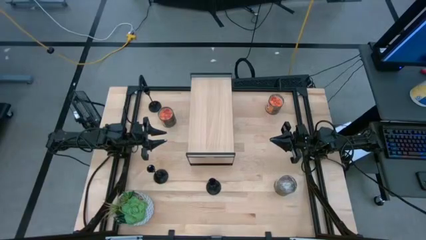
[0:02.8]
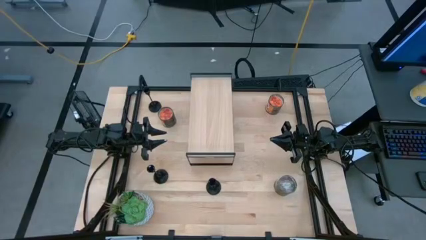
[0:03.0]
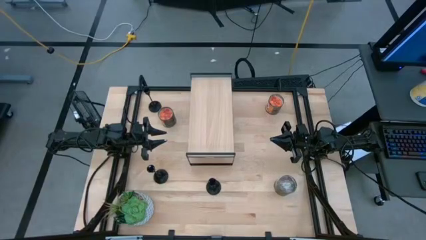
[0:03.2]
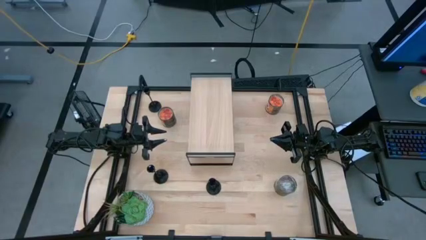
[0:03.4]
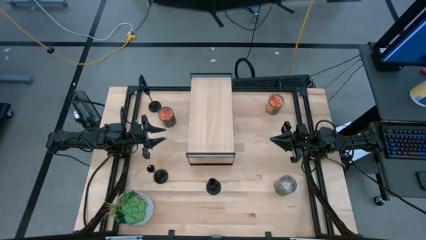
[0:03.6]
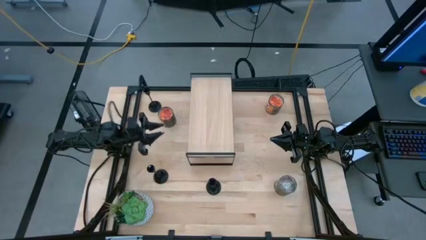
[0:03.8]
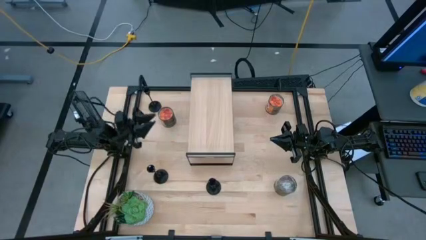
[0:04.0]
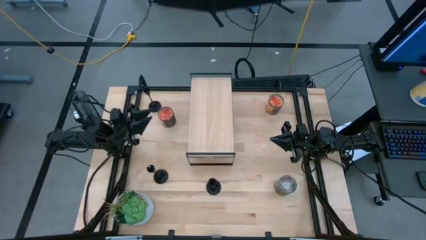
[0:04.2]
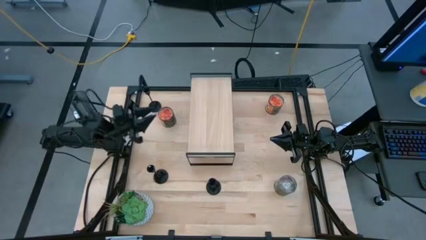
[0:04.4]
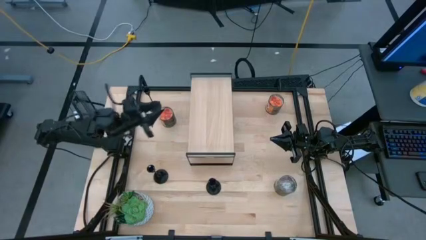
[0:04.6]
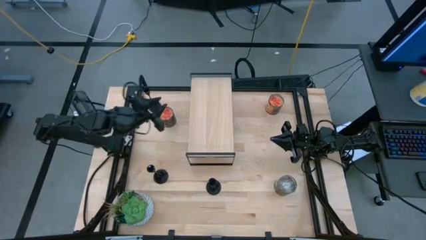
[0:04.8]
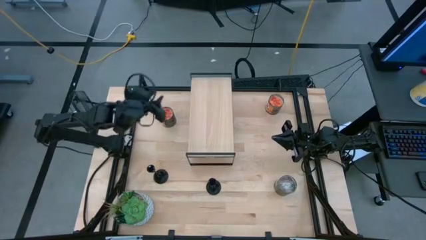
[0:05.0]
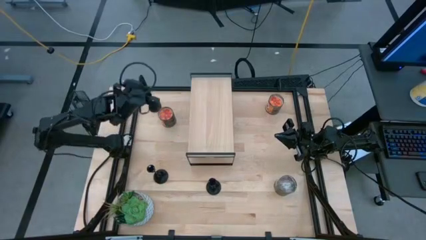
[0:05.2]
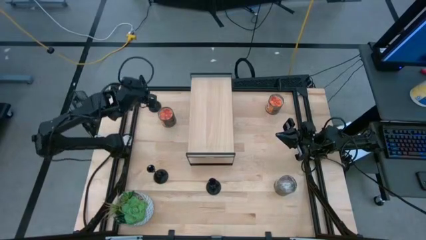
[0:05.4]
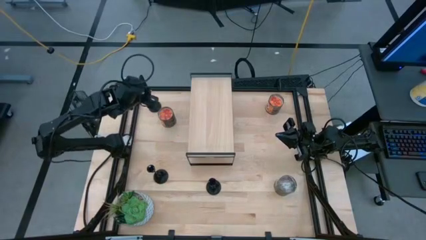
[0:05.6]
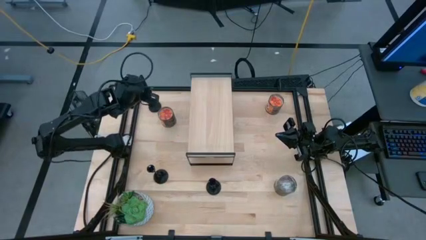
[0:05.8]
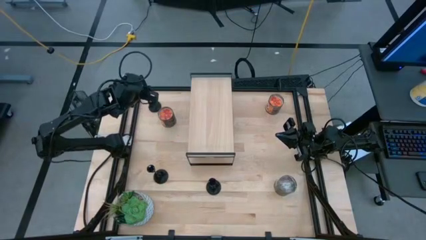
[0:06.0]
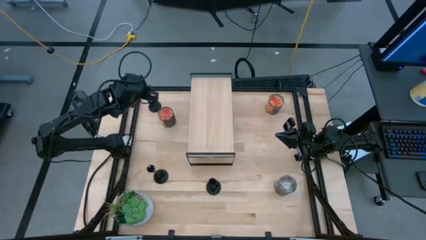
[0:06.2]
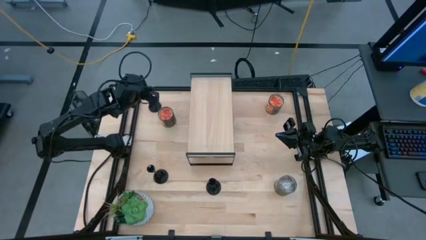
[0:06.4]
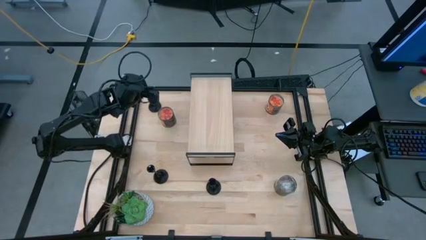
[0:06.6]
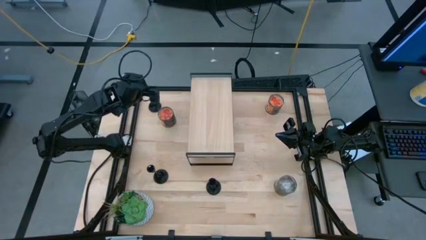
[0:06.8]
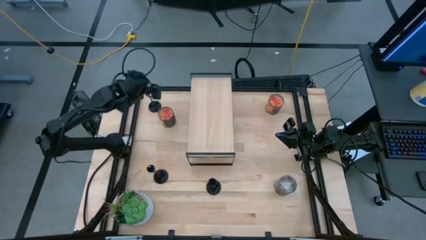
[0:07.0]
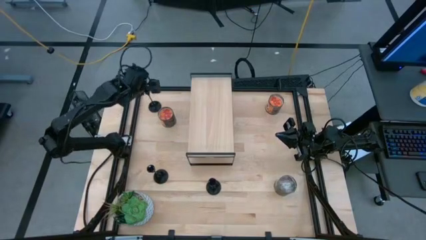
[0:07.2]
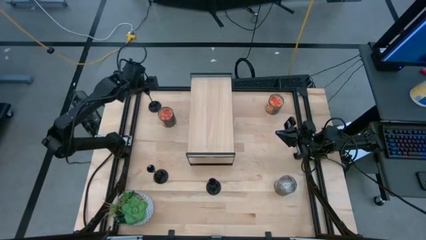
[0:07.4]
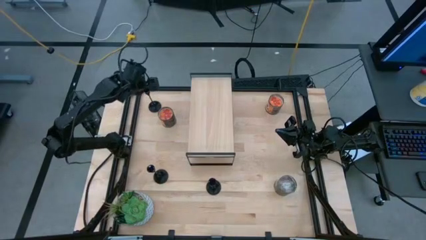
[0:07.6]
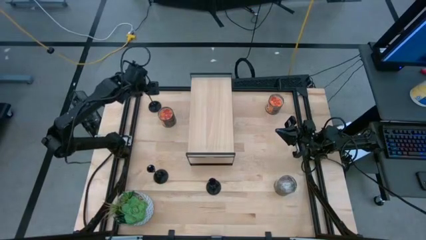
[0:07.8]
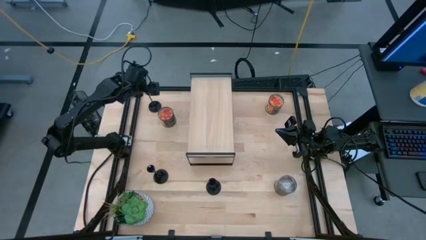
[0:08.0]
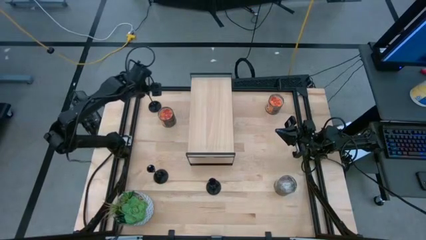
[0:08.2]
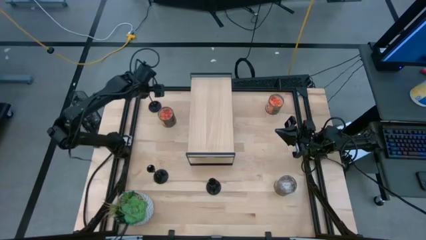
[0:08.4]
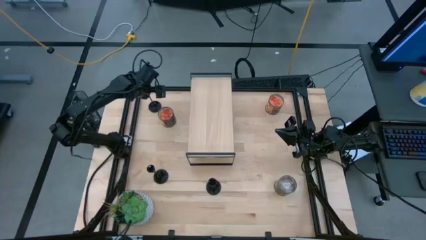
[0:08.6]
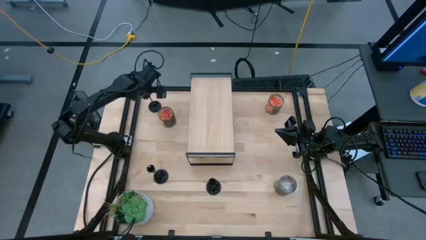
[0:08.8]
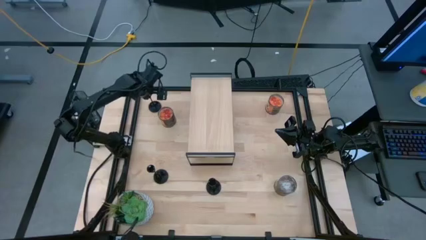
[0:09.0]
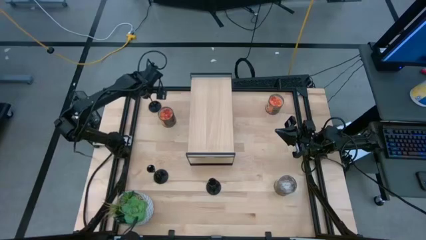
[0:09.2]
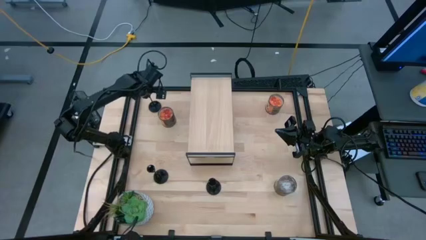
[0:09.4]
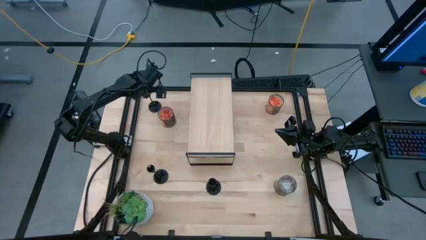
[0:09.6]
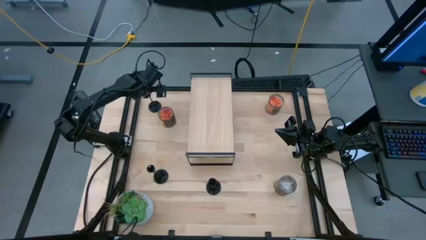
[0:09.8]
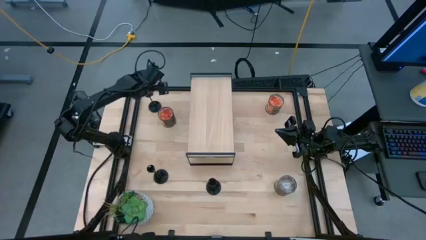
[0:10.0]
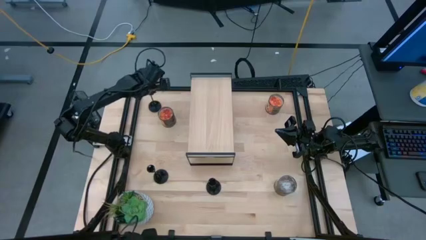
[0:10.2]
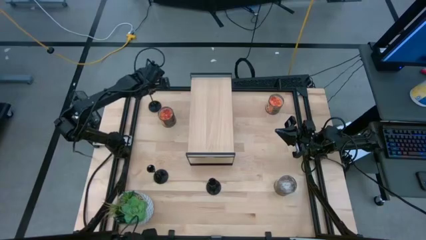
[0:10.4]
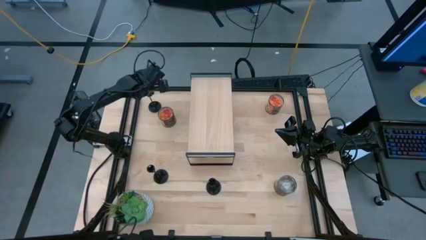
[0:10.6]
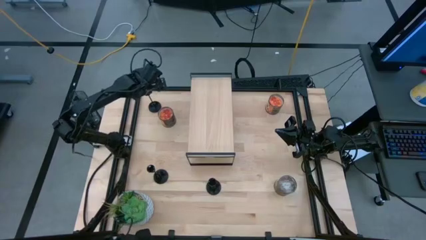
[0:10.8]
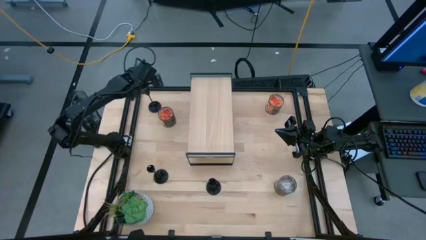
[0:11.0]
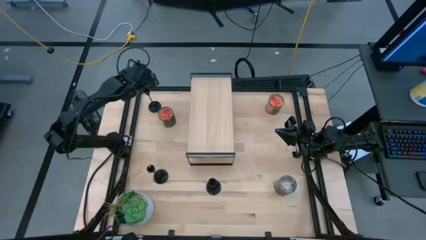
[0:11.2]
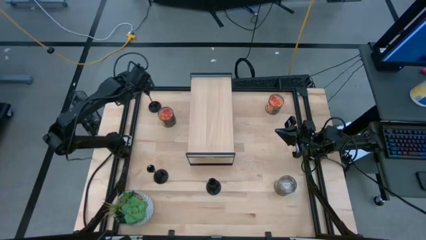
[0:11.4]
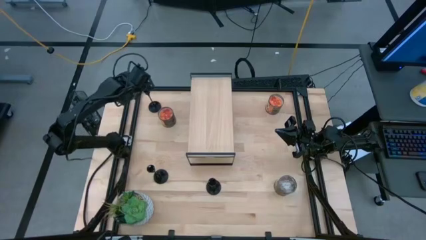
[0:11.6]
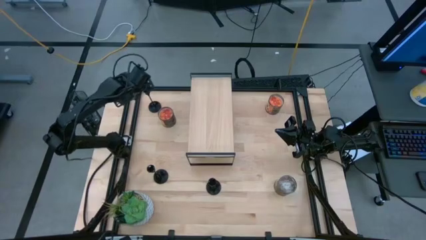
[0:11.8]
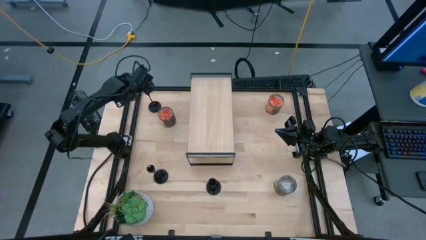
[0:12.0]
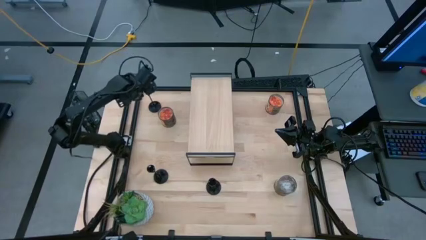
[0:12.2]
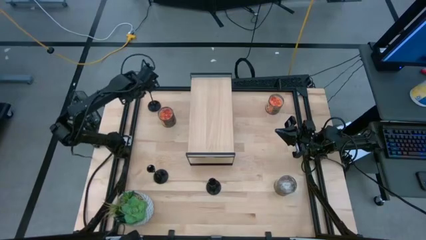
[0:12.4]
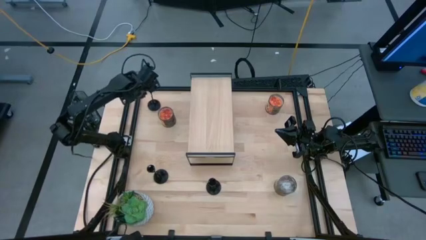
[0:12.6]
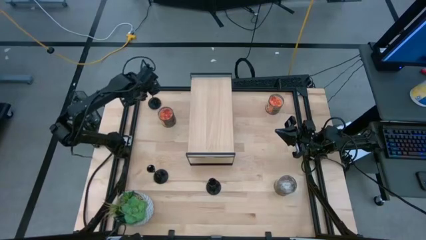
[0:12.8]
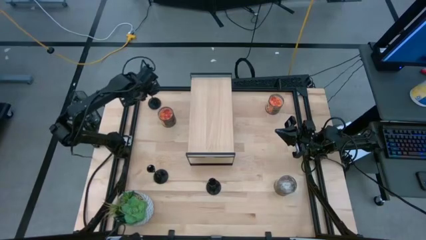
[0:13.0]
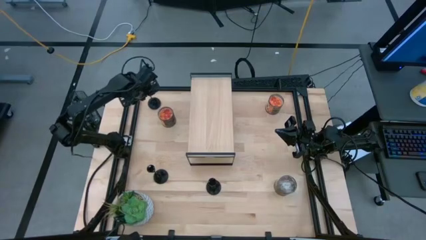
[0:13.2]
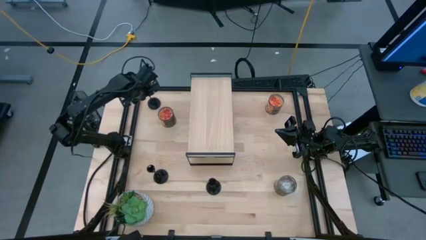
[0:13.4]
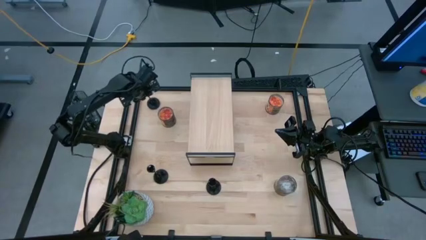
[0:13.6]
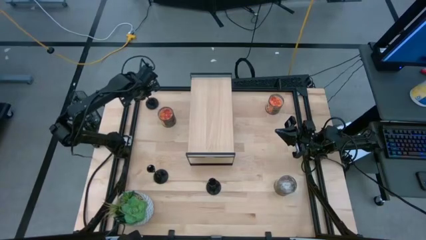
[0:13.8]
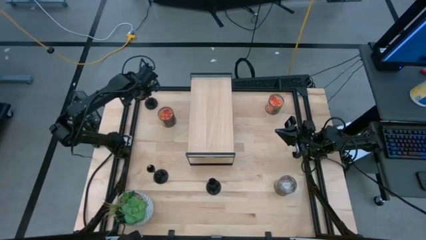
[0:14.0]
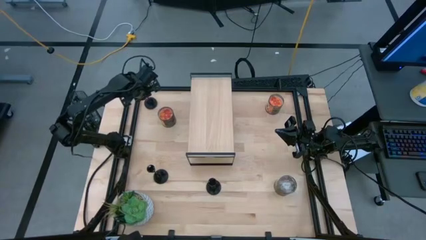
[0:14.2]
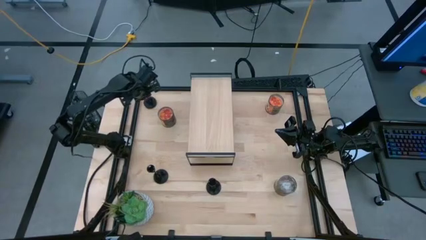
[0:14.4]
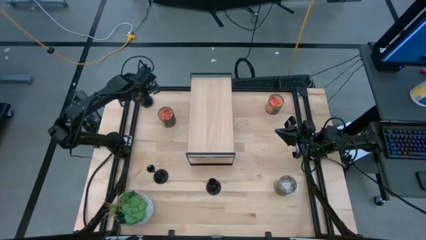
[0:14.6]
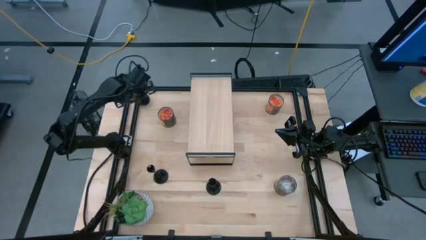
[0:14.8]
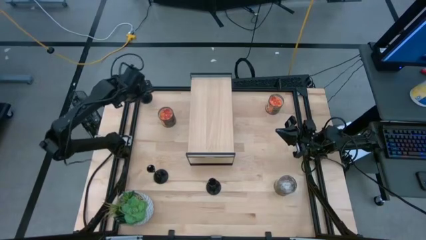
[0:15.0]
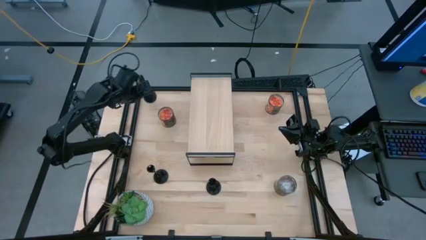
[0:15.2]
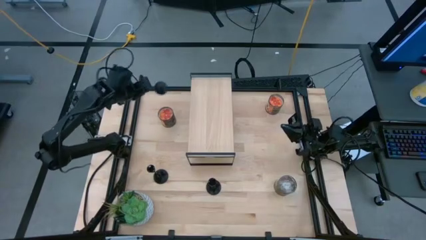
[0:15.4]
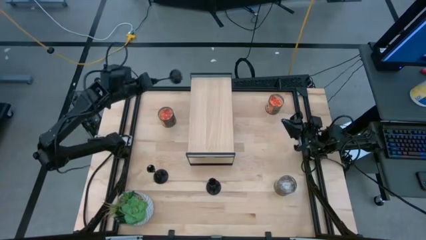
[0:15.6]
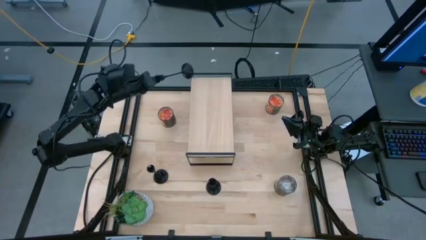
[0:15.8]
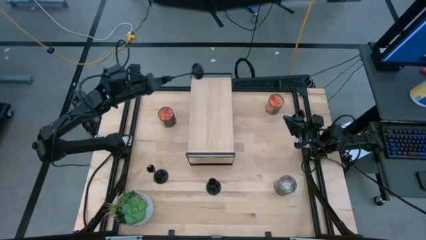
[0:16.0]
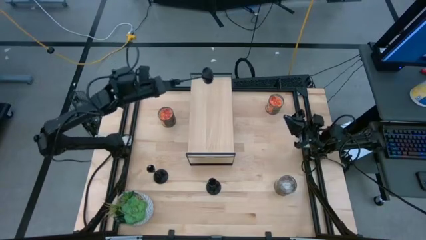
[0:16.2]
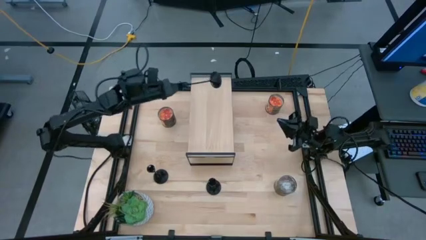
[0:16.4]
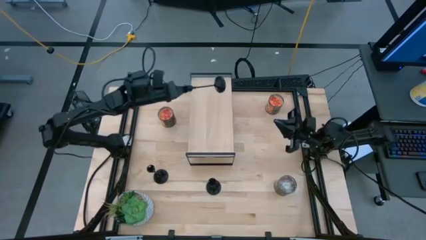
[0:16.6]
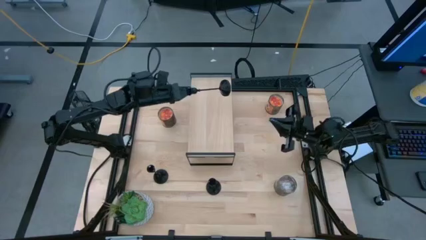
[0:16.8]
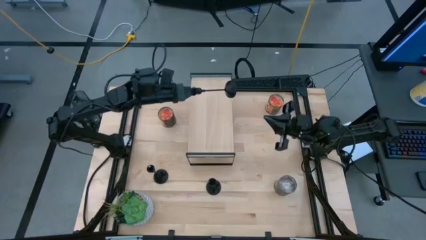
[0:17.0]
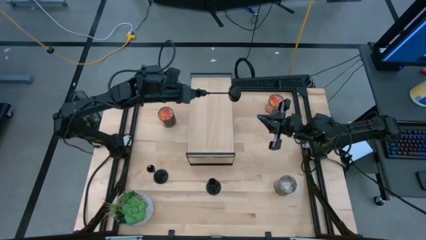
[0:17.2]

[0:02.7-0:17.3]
Task: Pick & Place candle stick holders
Put the top left black candle holder on the shelf
